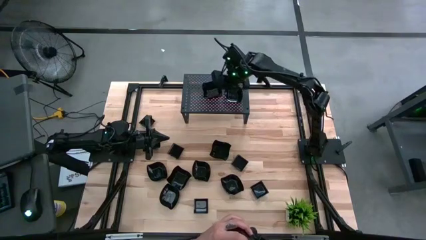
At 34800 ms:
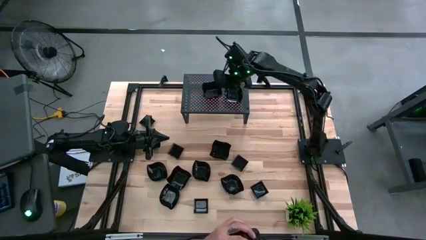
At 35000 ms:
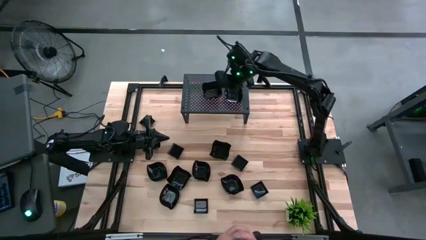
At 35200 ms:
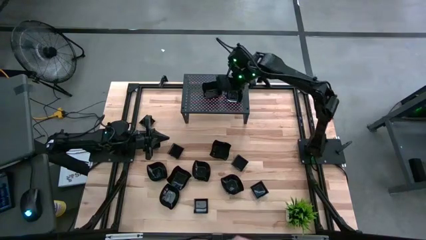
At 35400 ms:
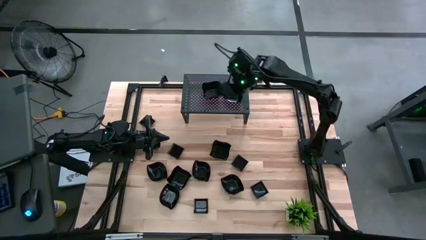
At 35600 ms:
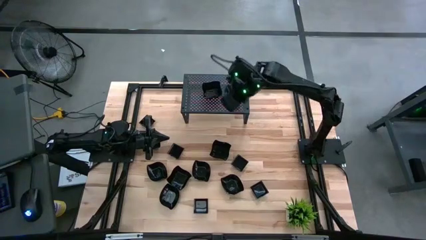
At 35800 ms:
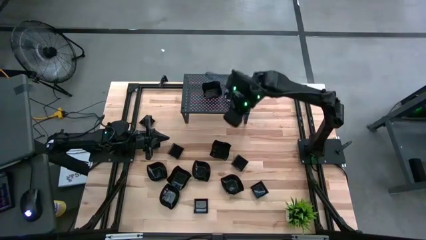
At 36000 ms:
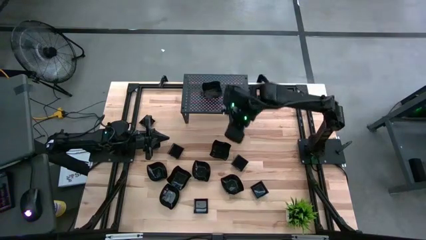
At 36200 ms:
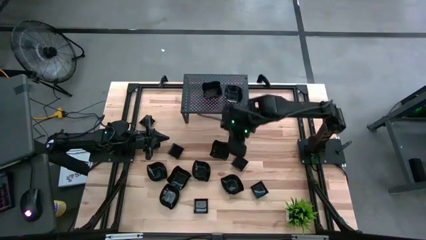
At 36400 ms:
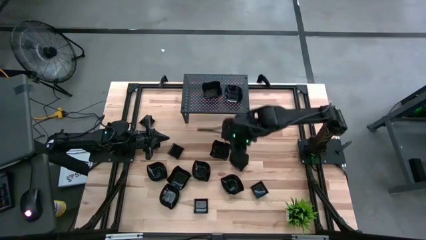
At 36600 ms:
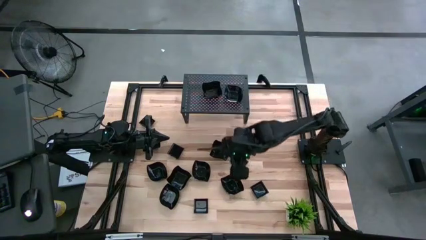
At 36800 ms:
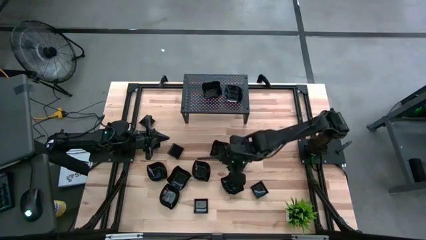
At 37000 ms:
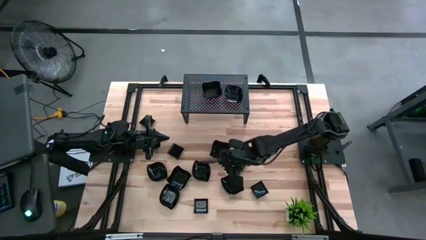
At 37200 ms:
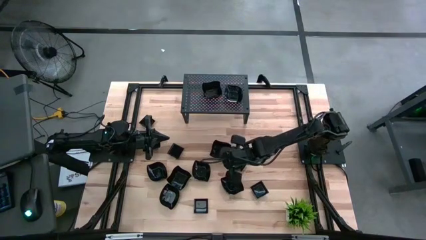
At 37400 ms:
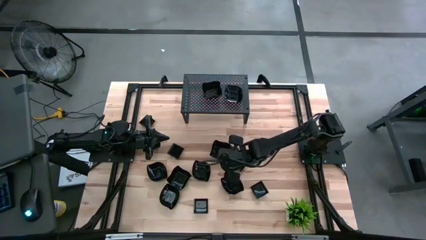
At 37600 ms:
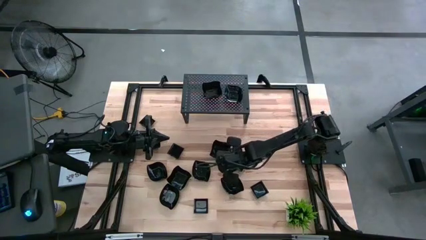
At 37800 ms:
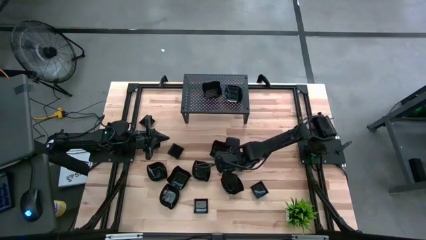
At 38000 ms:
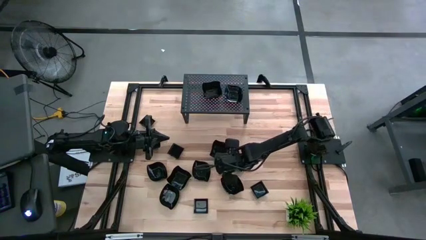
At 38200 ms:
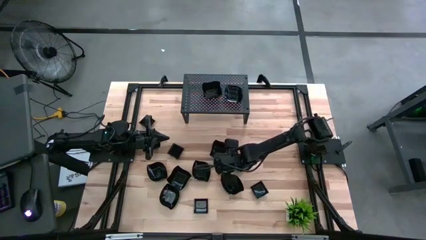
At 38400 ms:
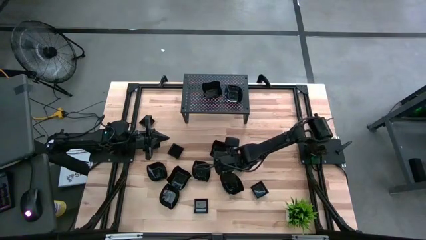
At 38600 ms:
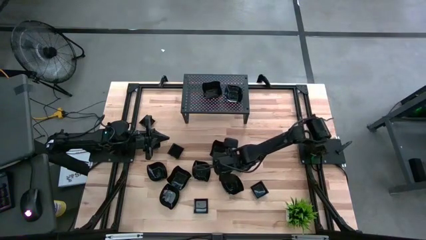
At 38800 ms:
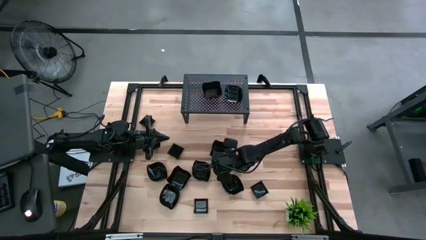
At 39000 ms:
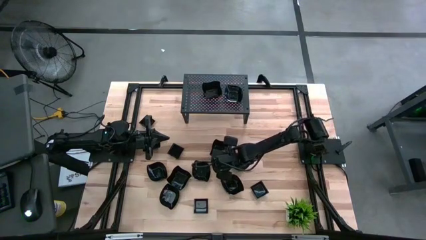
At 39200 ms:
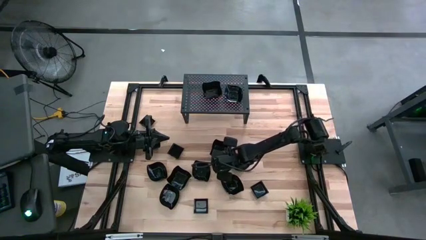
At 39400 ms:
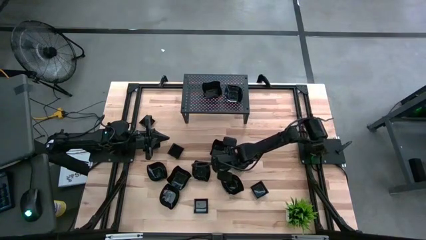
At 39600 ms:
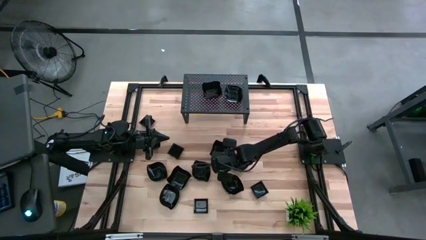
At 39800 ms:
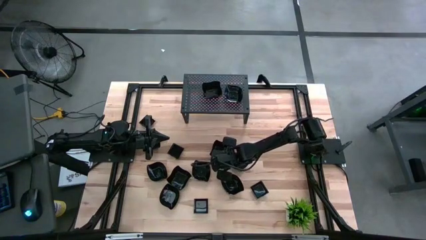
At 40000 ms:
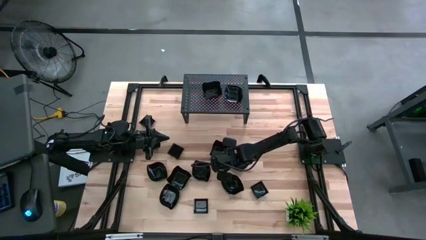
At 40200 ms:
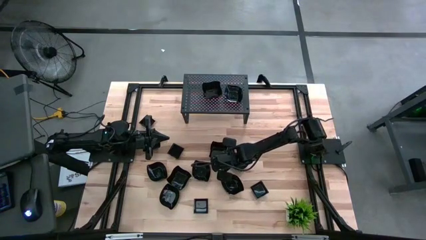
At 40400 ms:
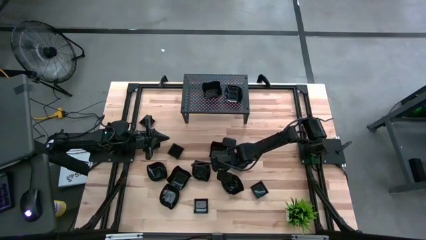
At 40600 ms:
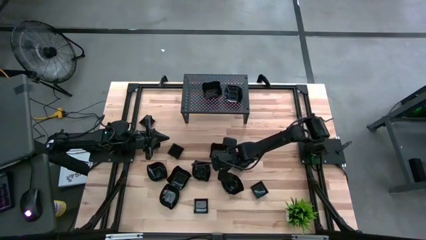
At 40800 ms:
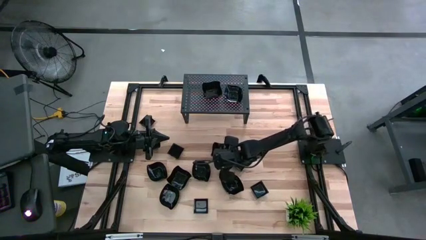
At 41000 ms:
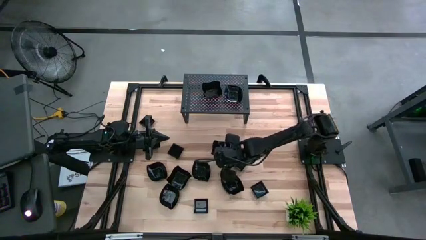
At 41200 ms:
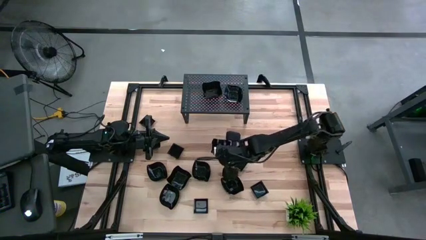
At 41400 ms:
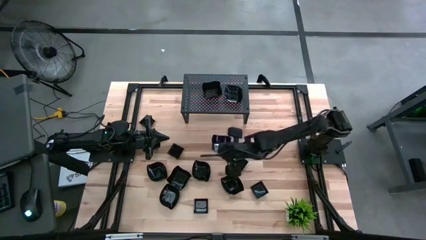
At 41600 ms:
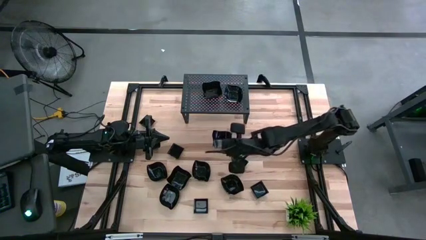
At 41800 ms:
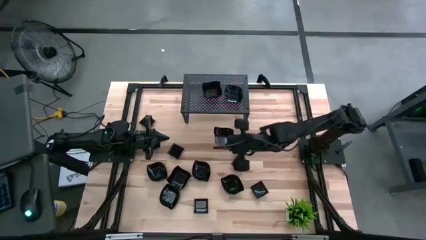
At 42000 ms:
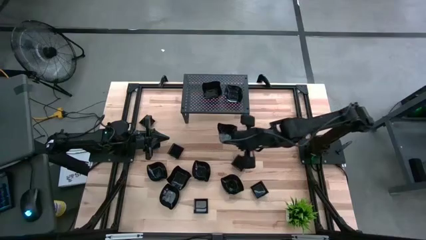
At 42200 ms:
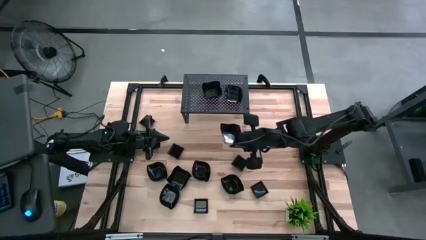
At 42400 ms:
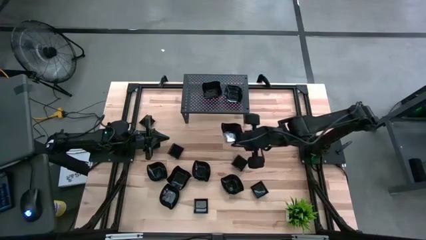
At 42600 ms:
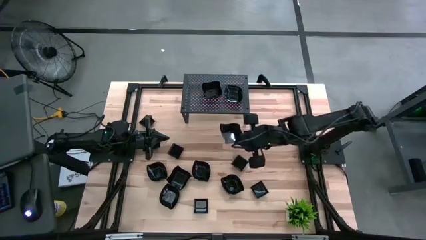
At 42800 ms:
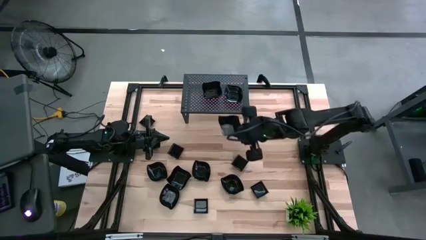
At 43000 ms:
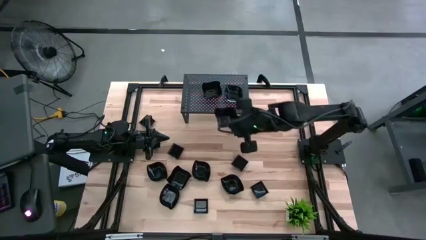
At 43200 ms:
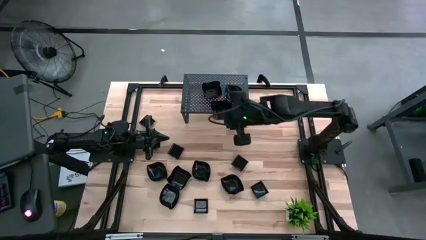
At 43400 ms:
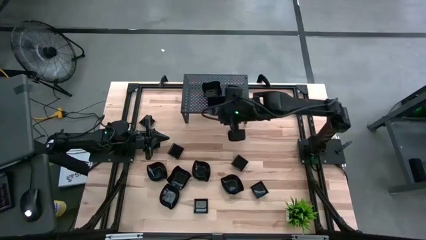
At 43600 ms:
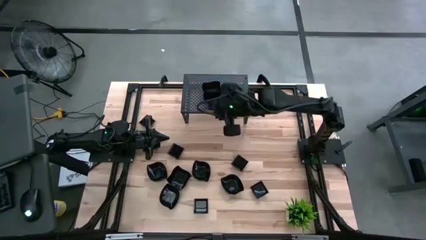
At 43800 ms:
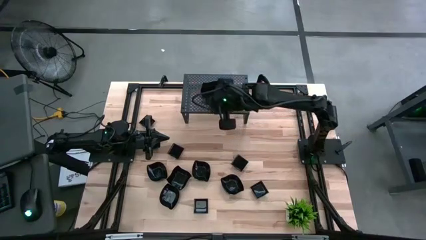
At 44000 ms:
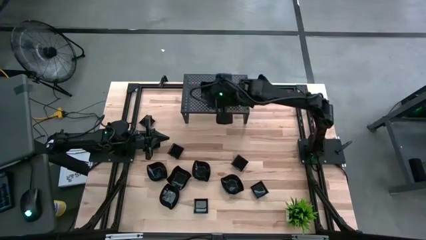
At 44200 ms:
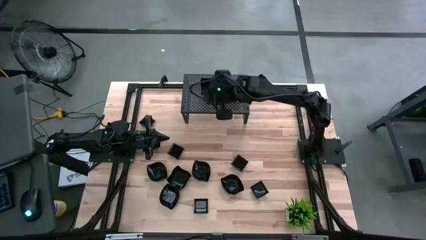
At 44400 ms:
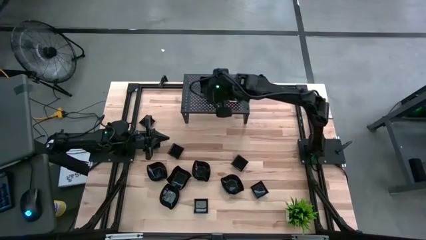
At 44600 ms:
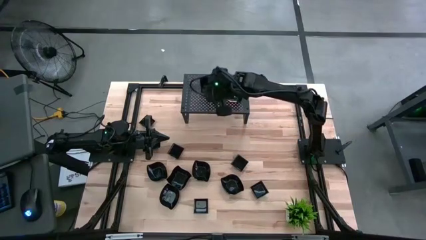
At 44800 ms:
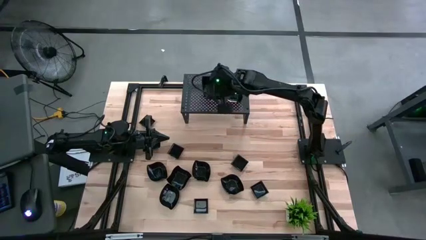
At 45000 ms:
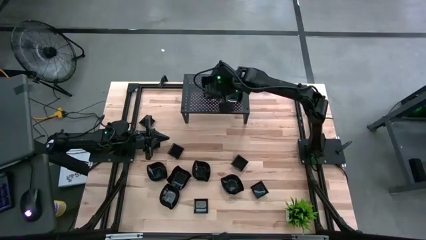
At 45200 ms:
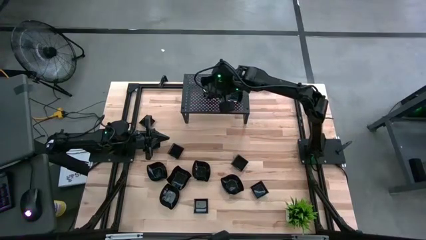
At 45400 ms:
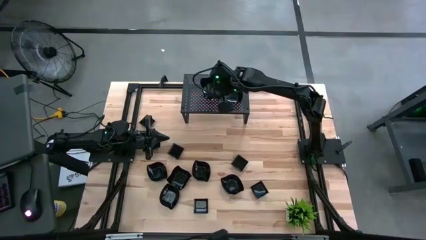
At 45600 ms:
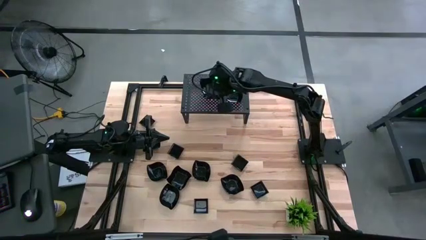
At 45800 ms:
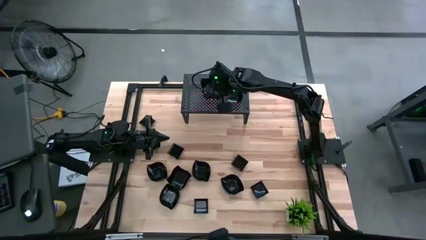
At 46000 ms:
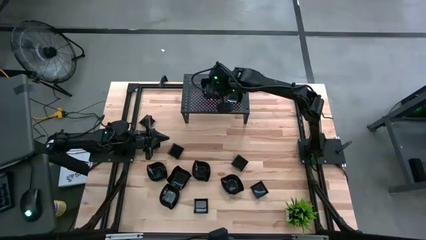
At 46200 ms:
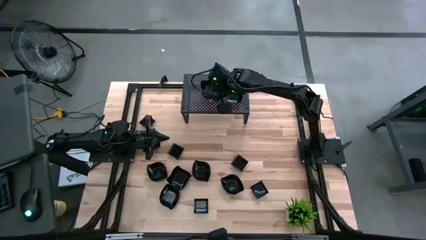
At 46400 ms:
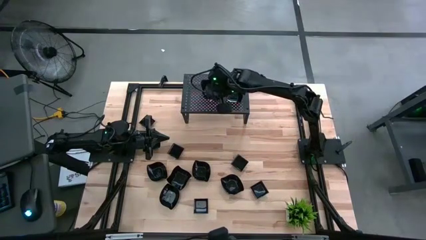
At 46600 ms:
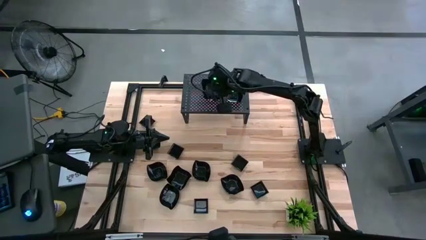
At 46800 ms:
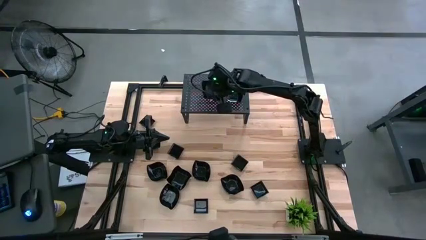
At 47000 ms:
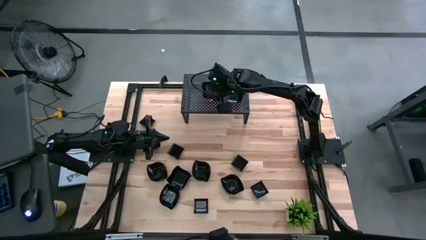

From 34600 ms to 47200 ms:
Task: Pick & Place Mini shaped plates
Stack the distorted square plate on top of the distorted square plate on the shelf
